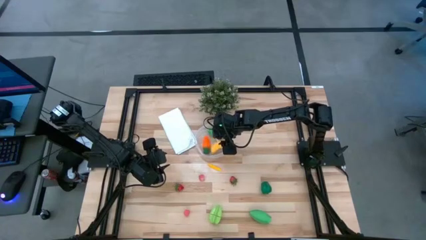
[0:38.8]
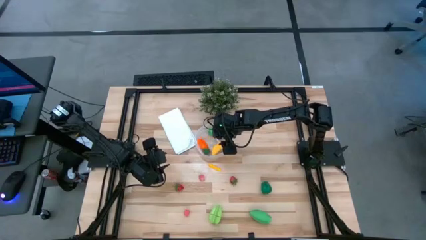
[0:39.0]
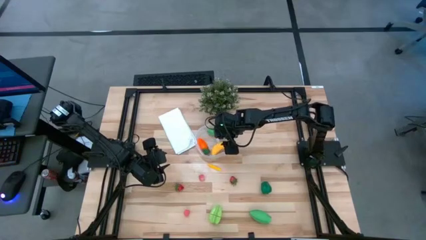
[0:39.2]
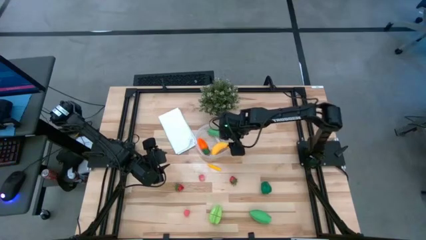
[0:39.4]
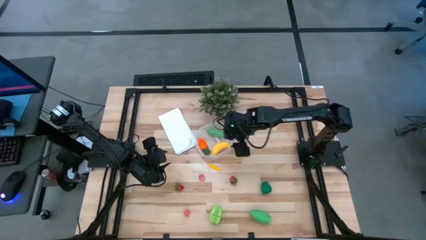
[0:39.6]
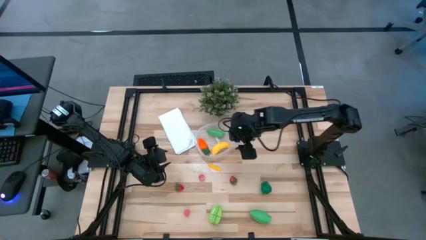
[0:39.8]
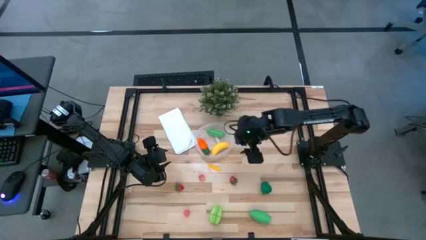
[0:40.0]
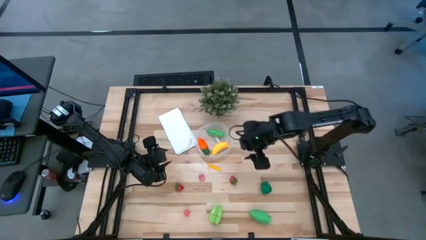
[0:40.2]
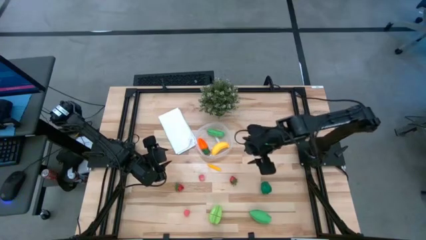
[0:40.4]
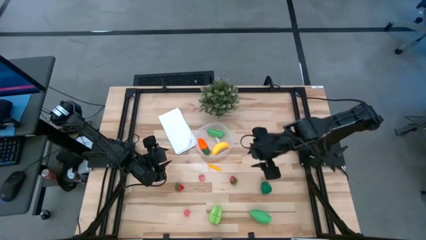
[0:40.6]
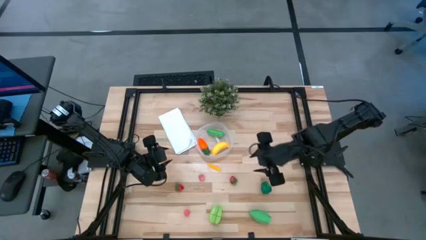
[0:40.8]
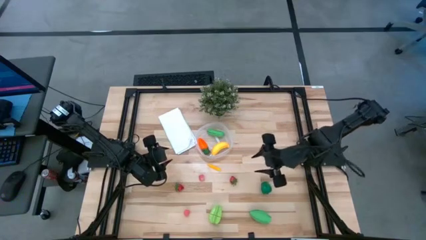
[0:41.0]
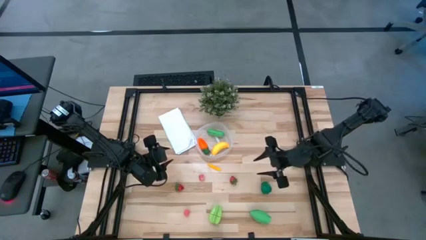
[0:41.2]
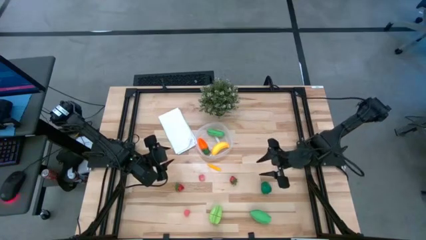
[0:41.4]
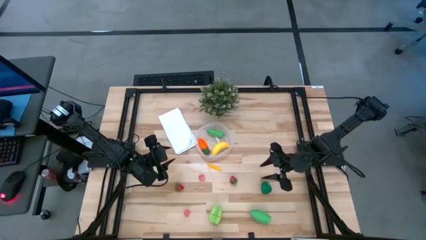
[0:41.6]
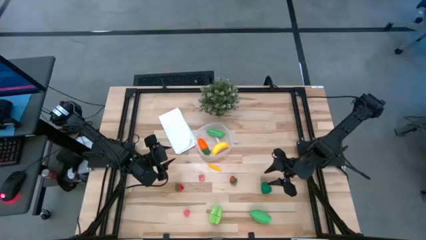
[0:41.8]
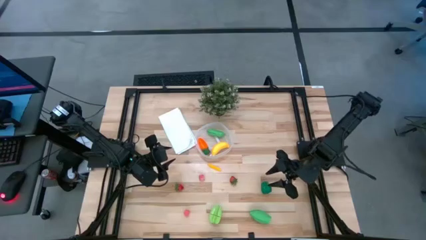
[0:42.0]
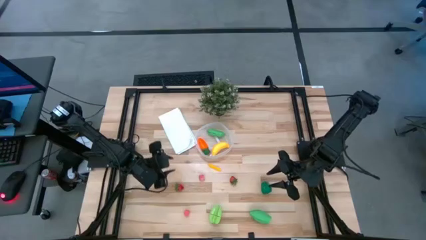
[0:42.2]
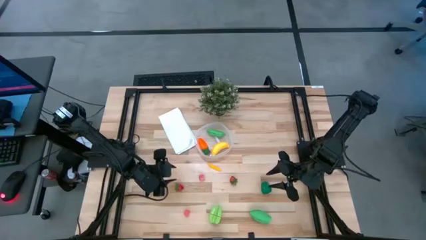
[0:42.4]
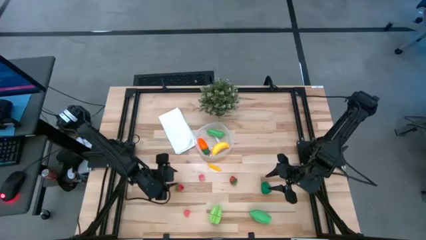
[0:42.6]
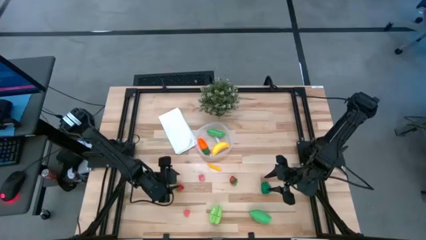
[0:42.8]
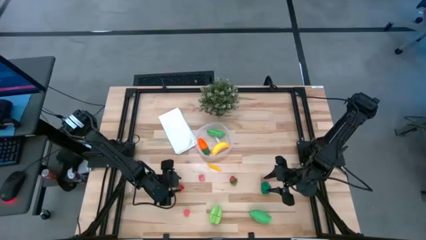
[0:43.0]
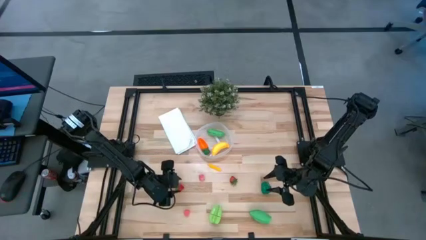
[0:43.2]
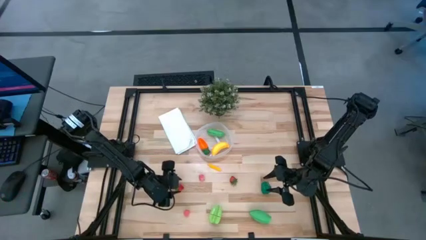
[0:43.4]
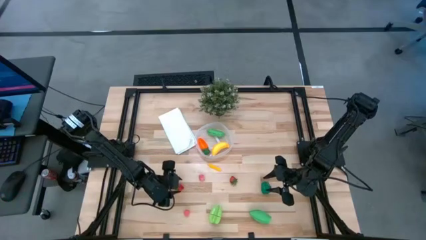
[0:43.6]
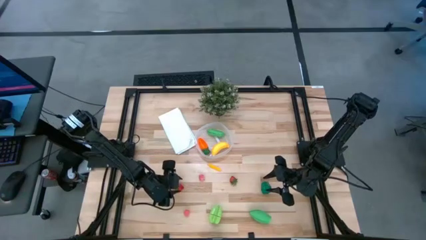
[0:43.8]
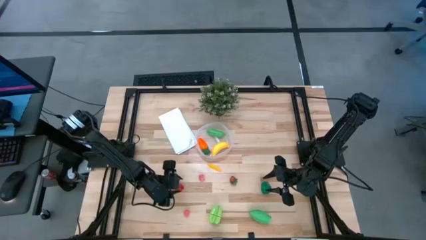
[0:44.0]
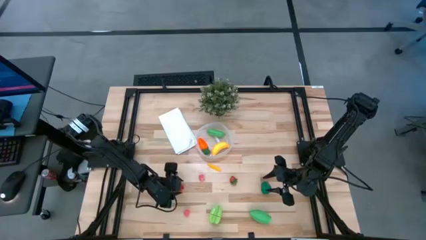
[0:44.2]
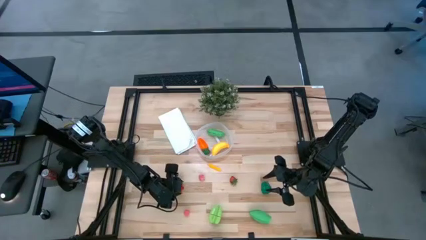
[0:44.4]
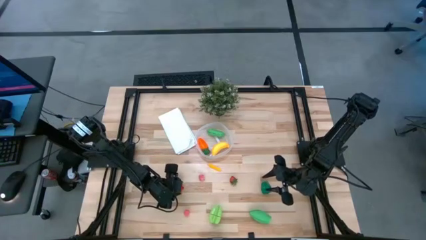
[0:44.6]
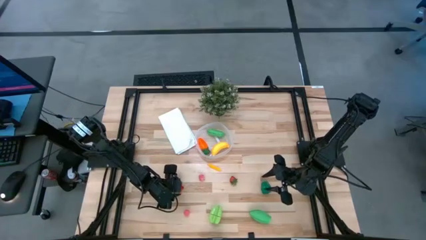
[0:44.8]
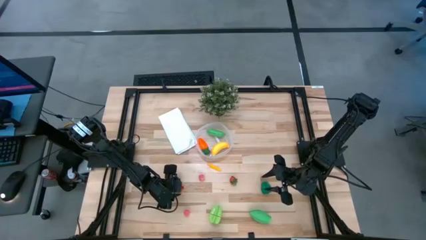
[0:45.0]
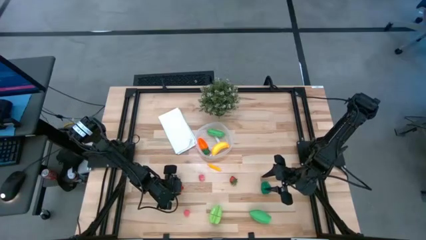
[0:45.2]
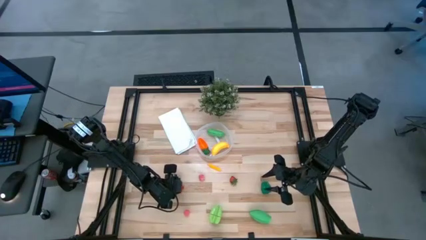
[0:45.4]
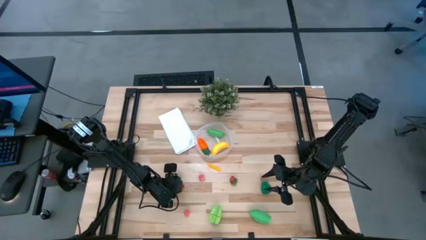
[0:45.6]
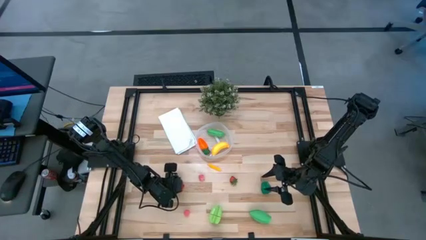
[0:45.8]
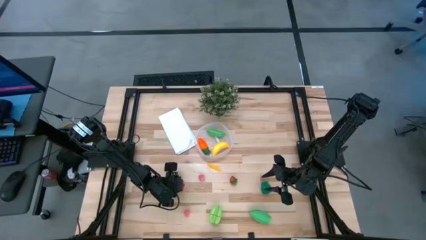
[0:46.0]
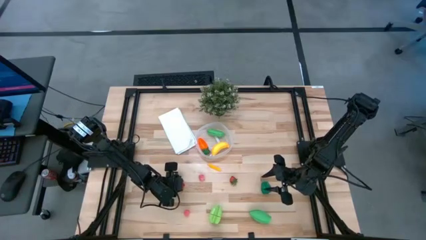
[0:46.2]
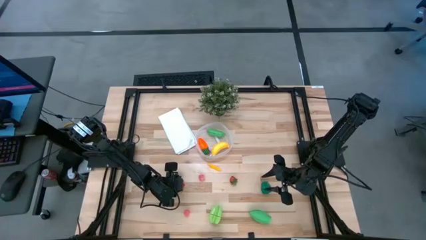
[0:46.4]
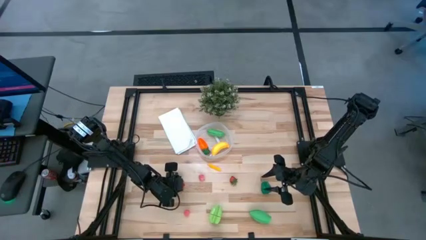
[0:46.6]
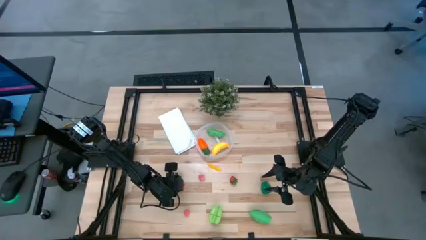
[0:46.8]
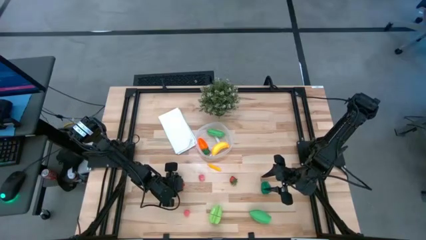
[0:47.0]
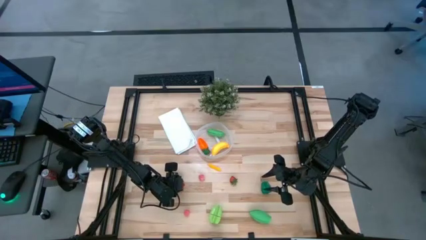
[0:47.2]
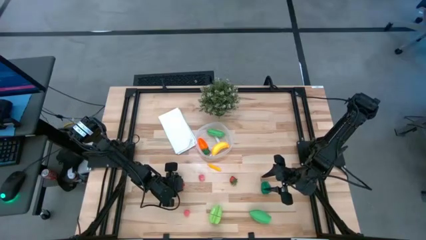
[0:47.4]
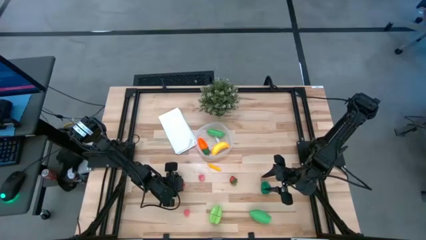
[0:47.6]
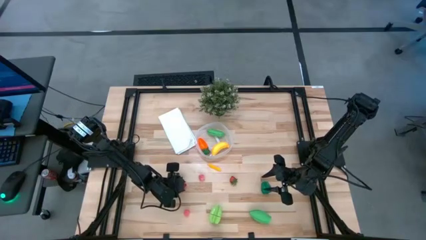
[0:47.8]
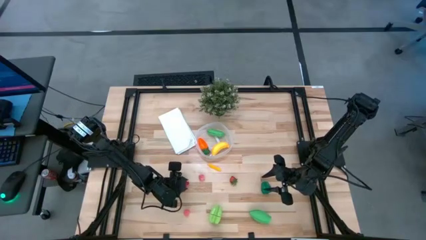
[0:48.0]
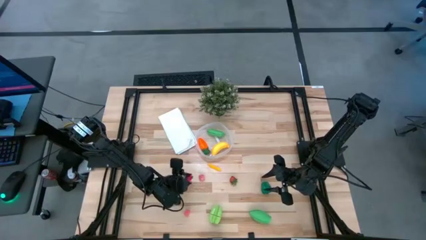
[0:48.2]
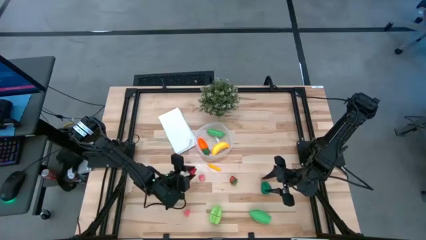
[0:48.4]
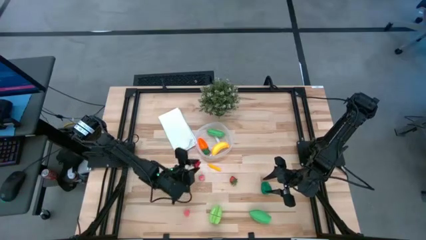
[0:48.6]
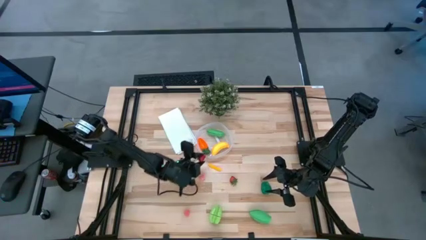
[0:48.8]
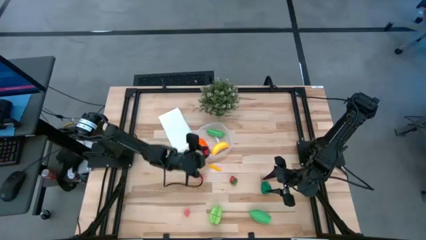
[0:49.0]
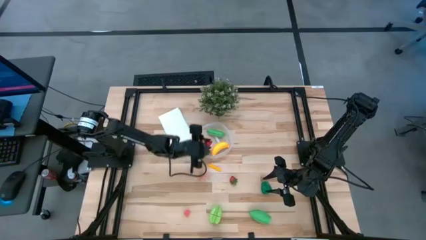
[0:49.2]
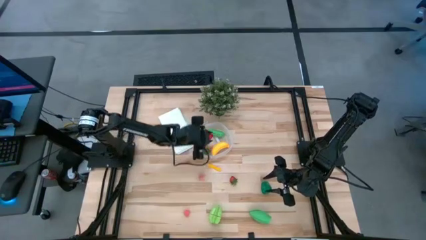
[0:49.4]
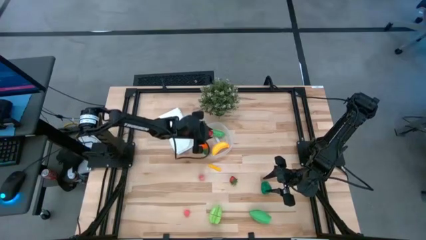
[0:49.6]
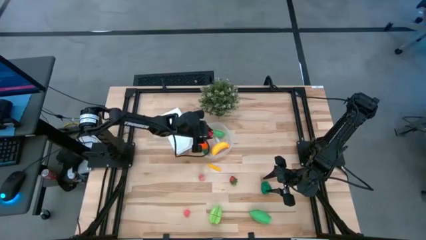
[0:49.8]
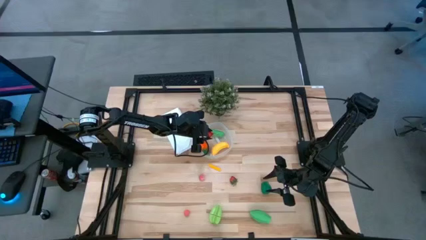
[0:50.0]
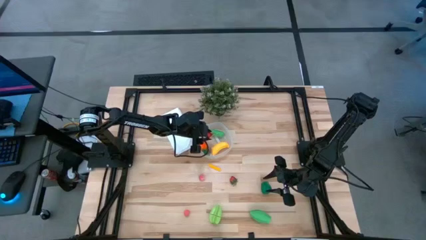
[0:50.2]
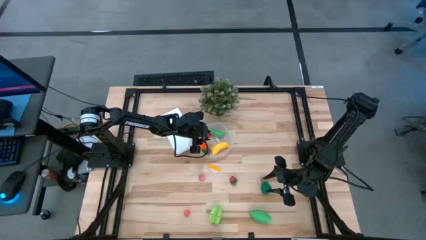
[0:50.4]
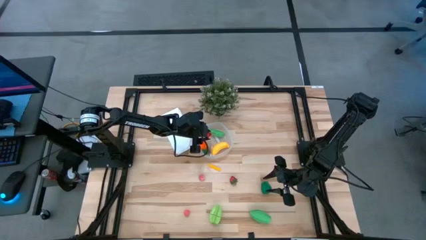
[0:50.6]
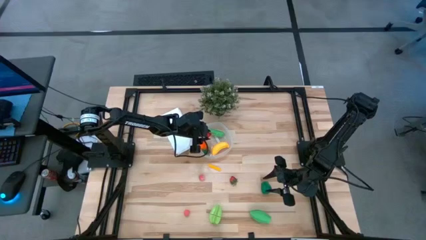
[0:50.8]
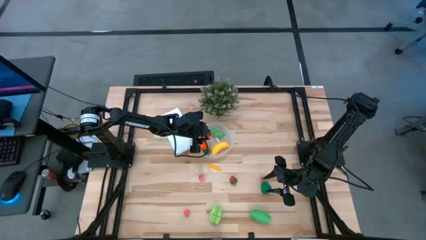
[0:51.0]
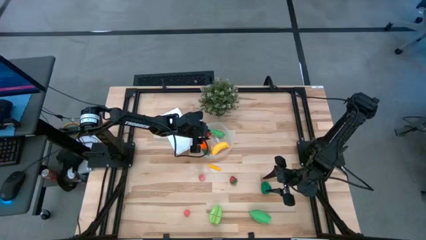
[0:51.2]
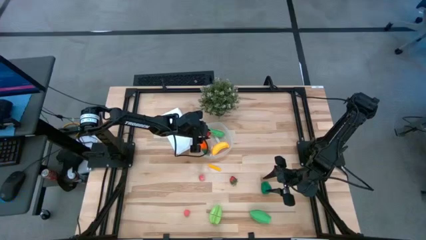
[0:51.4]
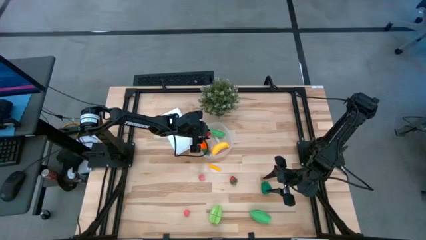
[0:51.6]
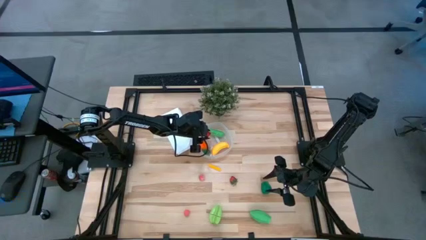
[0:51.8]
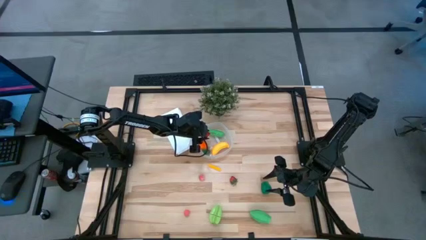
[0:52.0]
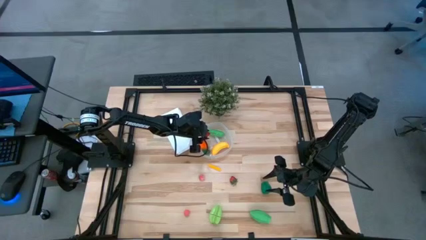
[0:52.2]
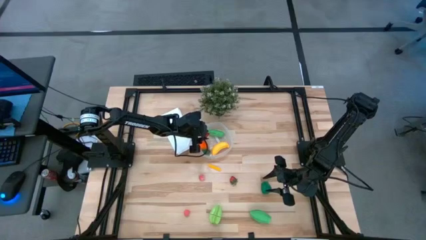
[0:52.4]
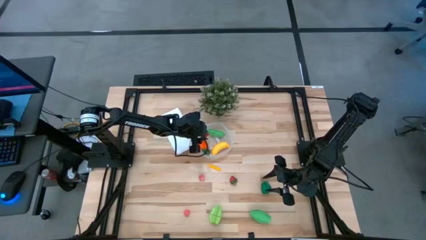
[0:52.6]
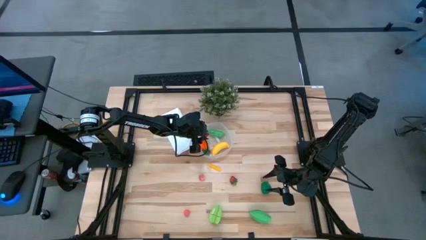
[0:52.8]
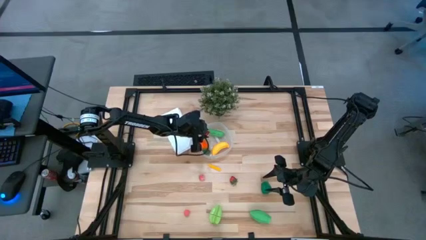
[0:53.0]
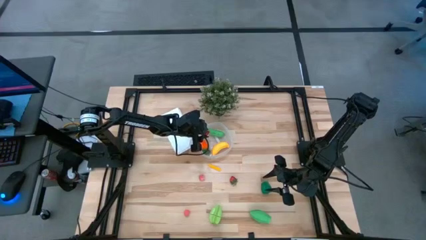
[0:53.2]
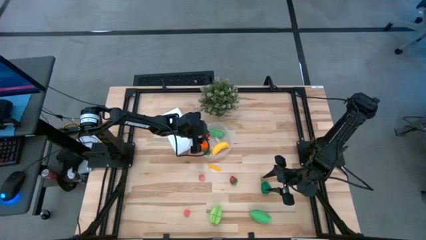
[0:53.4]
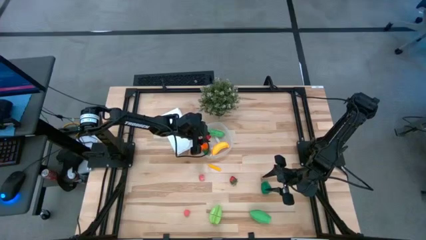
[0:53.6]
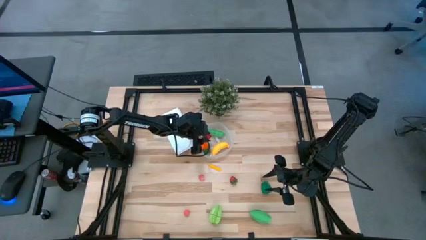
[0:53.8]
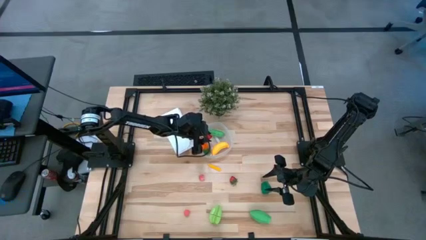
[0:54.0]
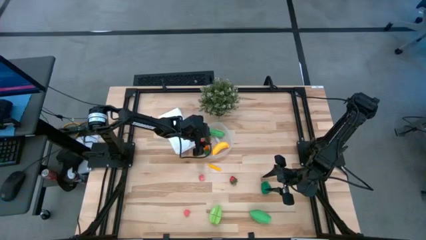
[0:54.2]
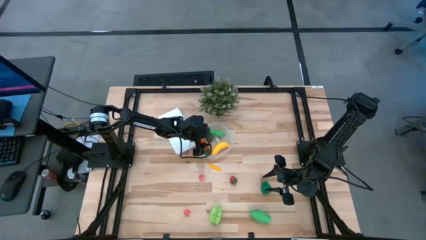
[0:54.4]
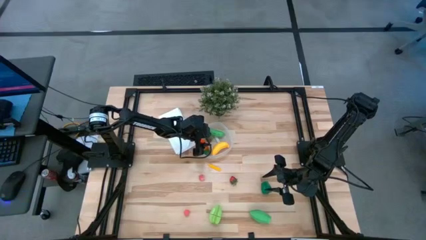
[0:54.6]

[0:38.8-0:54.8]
Task: Pick and placing Produce into tupperware
Put the left red strawberry into the transparent bin
